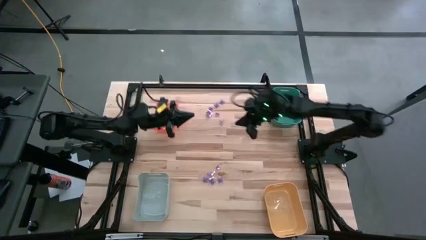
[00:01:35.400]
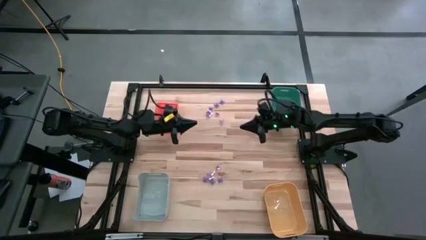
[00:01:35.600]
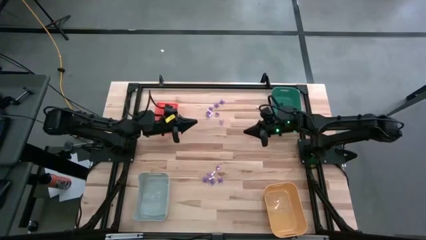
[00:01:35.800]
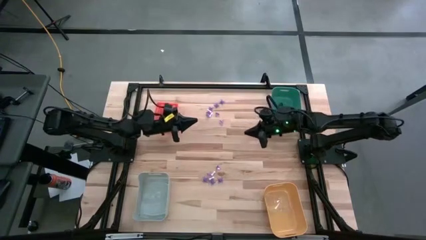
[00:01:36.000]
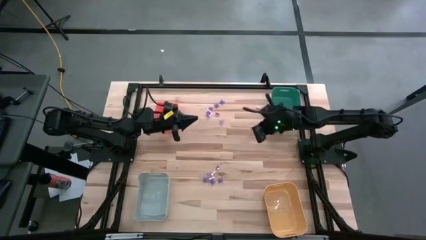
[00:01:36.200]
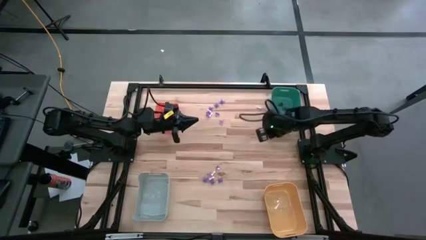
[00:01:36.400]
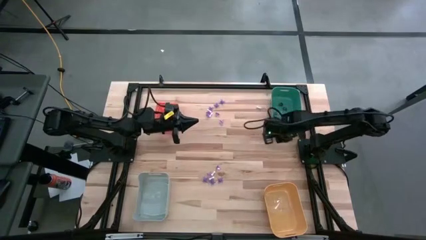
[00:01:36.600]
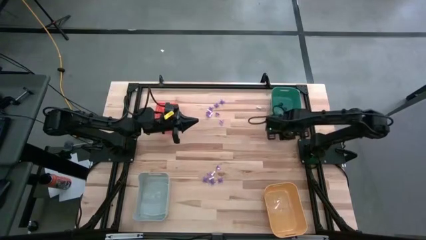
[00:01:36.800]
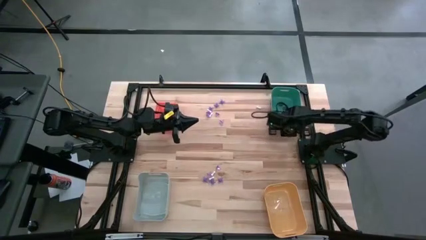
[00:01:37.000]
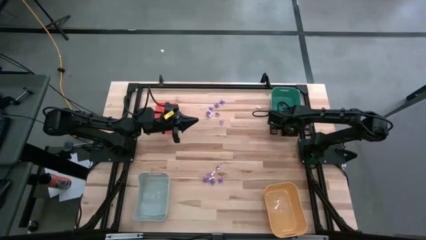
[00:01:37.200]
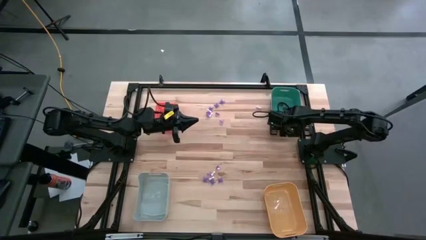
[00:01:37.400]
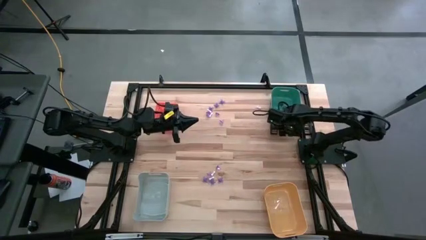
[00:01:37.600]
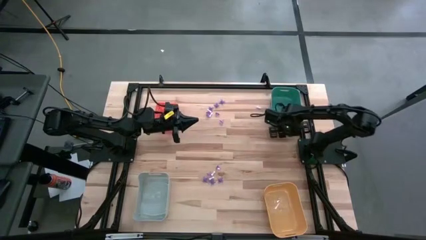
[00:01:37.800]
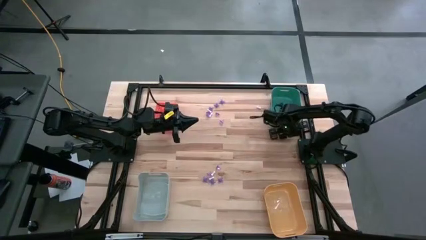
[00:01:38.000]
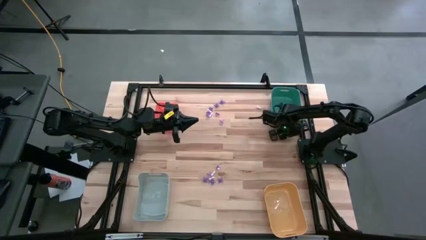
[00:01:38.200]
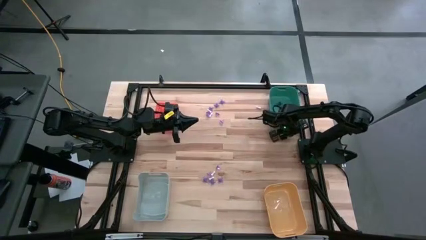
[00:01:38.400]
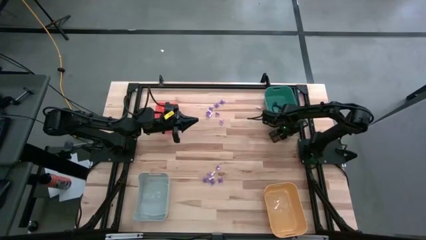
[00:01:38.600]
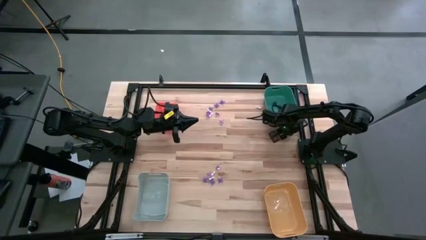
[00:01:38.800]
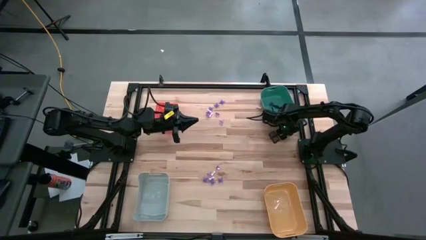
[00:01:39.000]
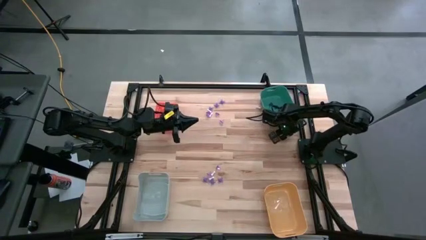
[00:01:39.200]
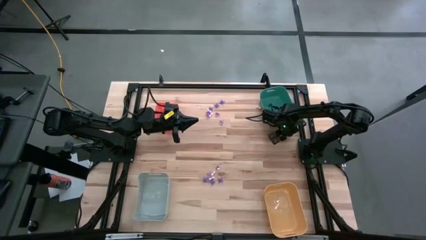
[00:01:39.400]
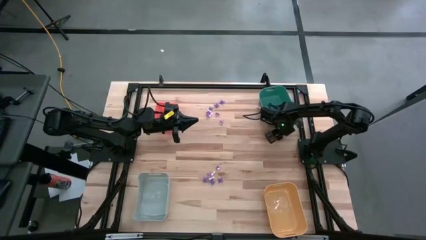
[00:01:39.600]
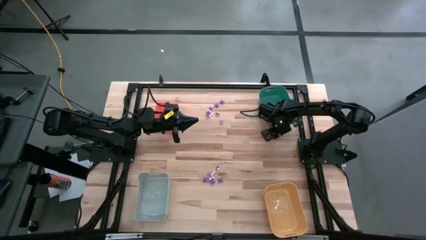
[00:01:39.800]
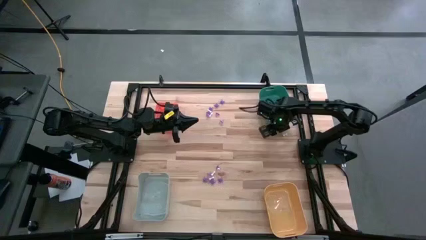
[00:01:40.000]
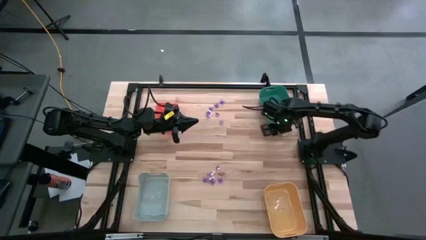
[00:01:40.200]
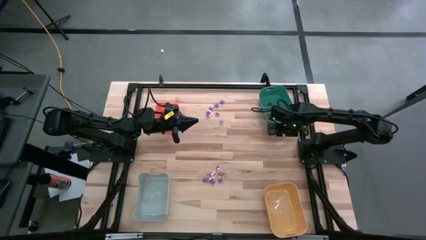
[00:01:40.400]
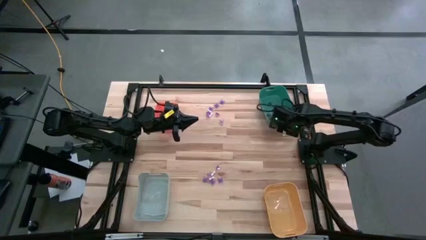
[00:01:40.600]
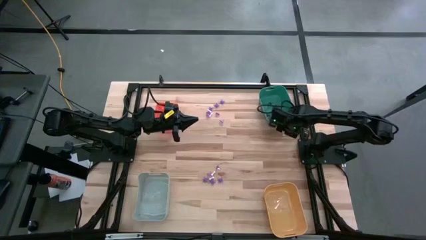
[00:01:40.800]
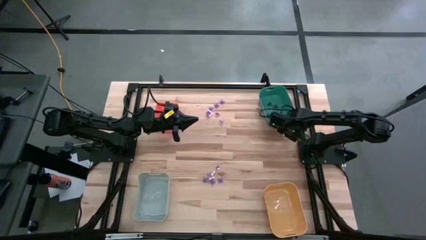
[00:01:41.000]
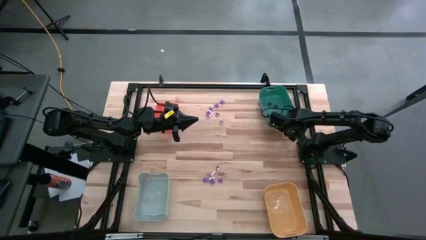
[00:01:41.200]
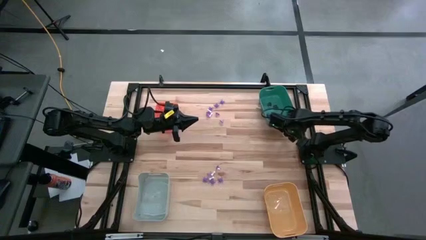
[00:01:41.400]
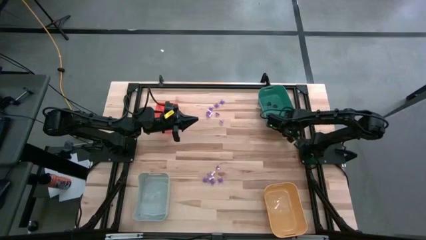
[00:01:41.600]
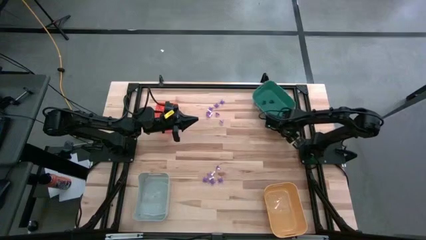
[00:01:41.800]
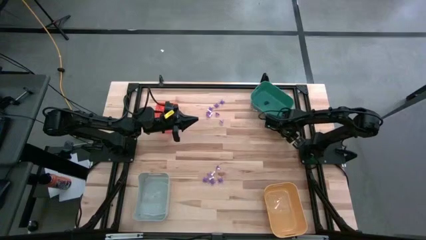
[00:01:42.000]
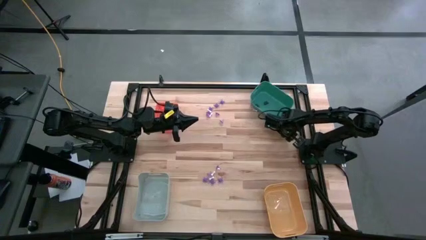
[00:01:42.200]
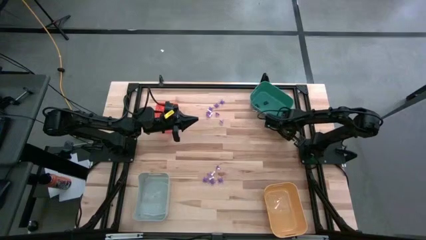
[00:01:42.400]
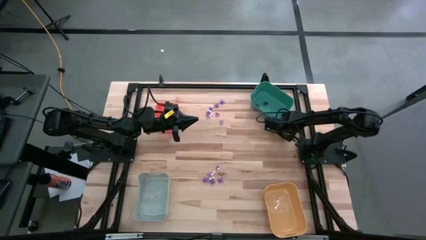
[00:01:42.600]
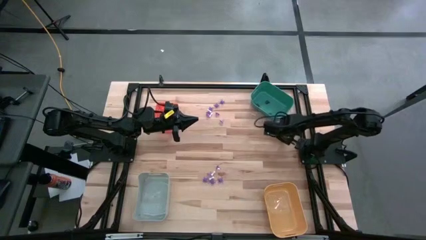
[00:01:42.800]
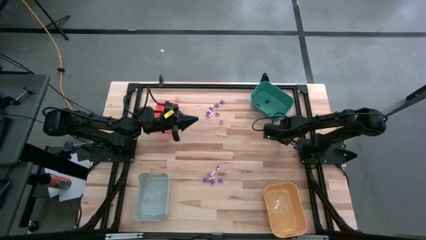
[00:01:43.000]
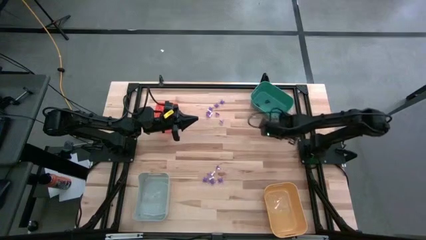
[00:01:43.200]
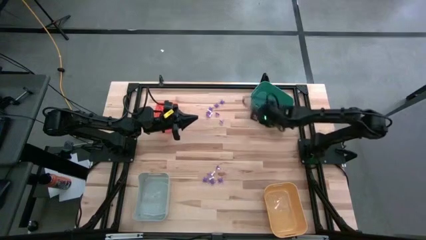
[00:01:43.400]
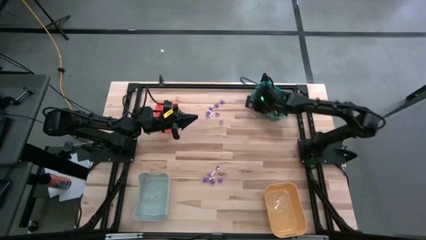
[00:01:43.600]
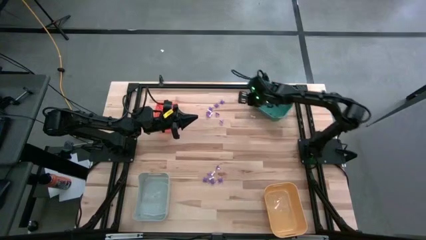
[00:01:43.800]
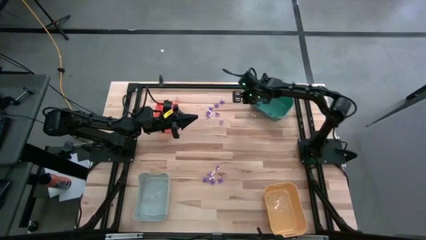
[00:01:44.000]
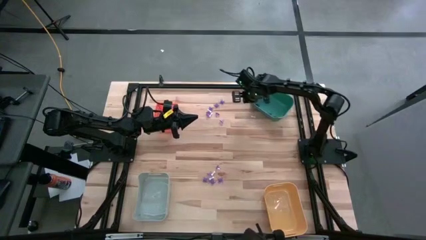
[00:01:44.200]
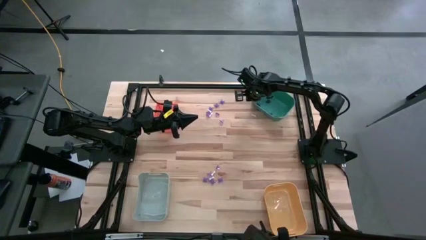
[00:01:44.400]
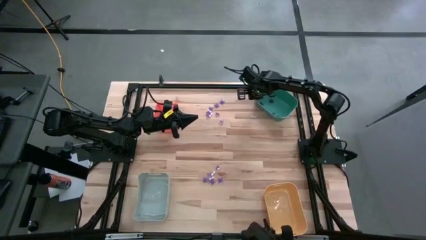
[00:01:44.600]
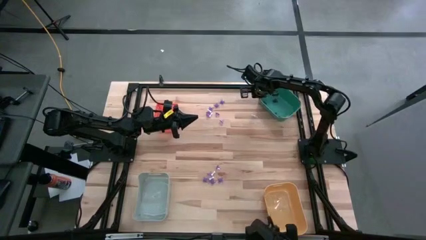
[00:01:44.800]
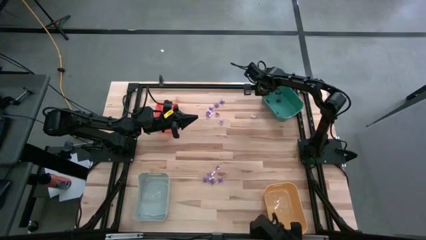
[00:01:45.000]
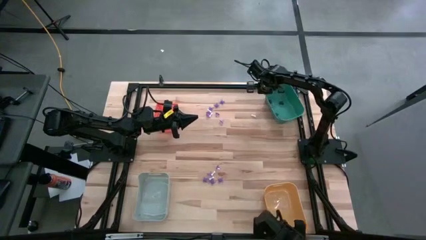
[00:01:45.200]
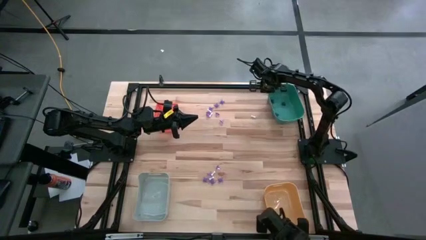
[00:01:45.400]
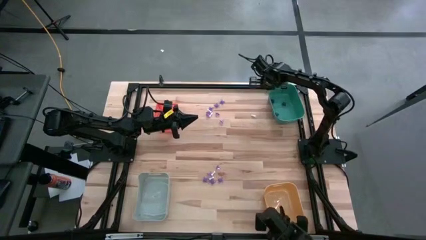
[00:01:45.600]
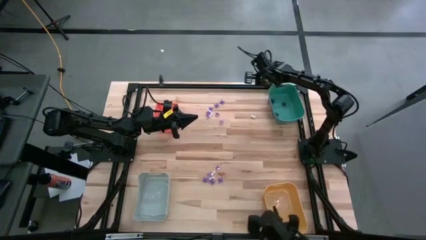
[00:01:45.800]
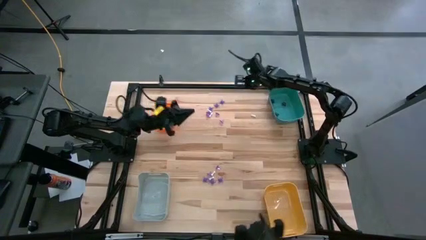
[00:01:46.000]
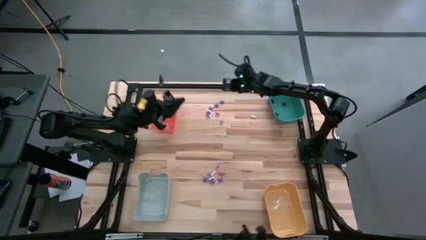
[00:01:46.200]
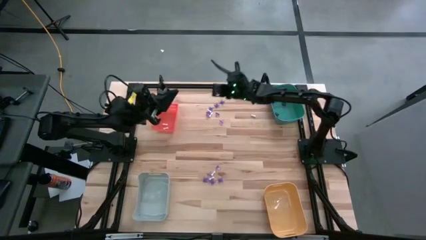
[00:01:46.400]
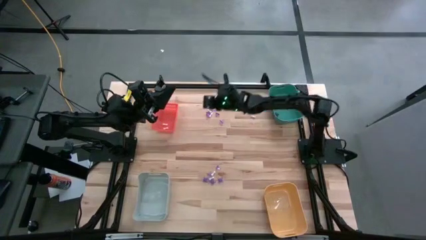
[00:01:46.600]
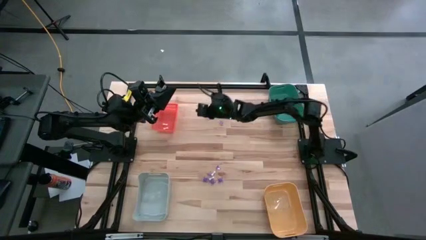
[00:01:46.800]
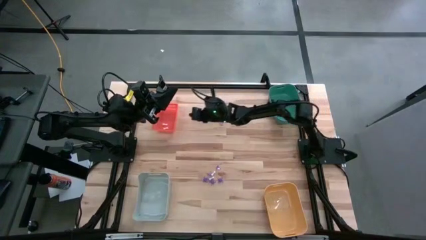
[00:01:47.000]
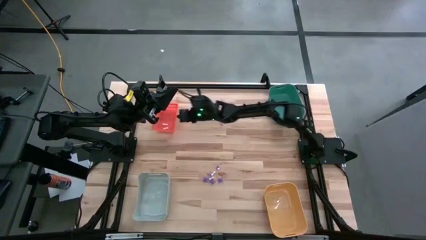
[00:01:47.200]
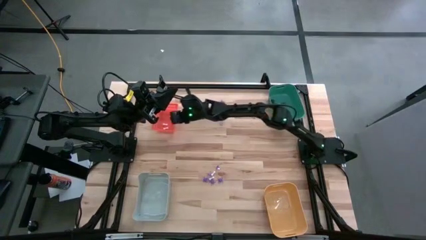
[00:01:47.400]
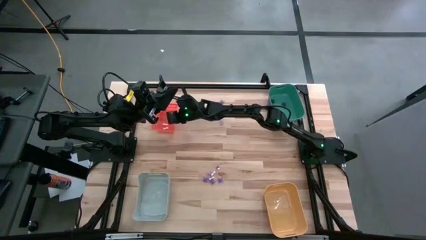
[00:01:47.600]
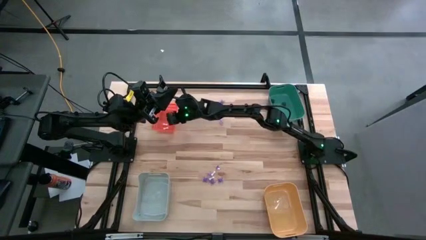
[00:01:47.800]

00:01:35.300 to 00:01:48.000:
Task: Sort Halloween decoration
Put the white bone toy into the orange bin

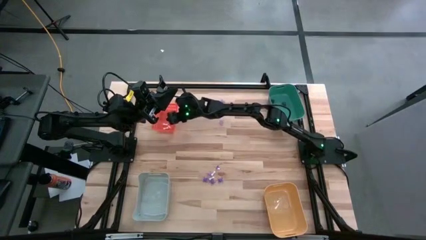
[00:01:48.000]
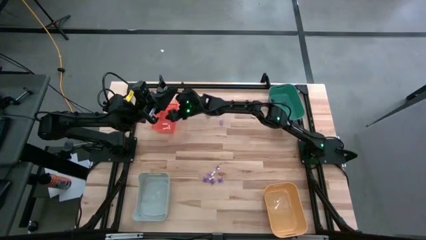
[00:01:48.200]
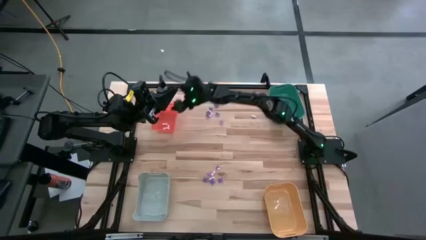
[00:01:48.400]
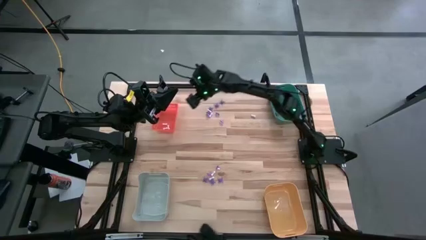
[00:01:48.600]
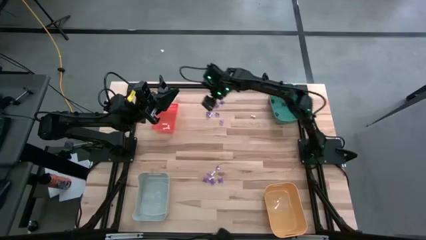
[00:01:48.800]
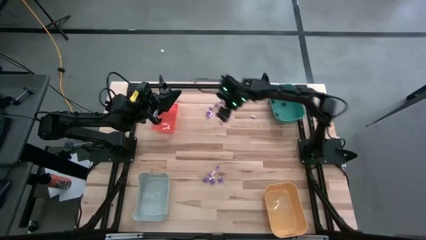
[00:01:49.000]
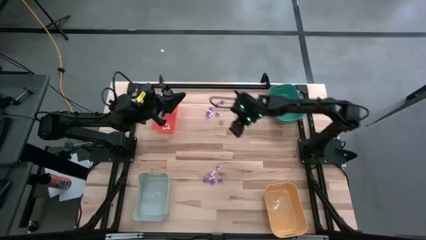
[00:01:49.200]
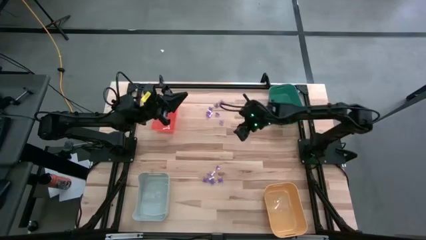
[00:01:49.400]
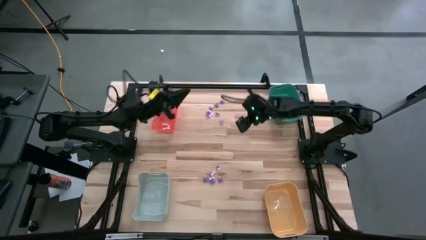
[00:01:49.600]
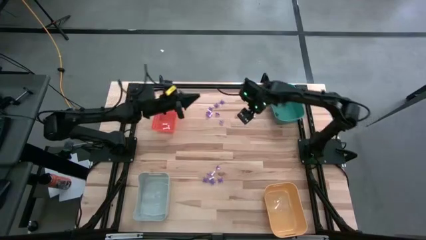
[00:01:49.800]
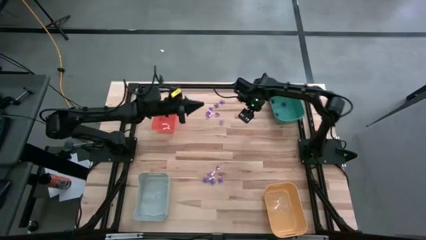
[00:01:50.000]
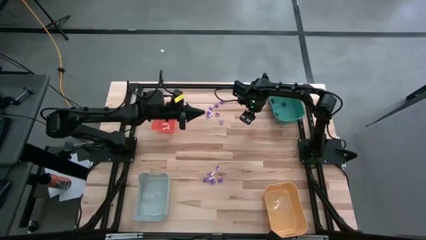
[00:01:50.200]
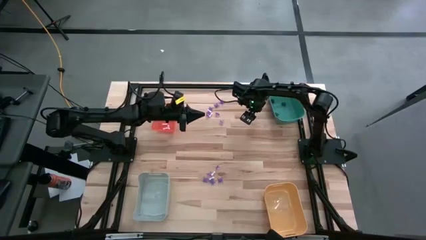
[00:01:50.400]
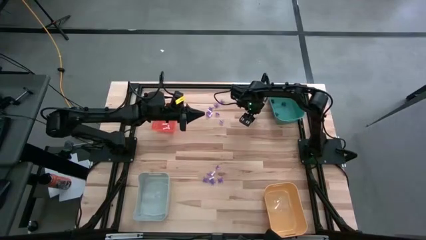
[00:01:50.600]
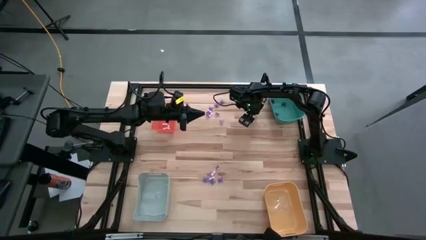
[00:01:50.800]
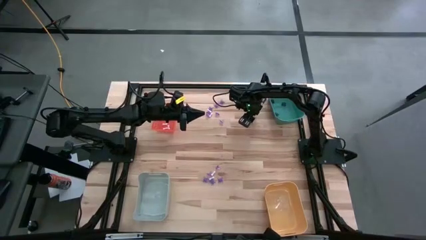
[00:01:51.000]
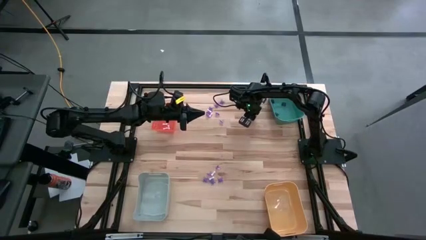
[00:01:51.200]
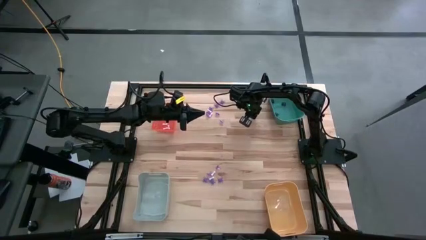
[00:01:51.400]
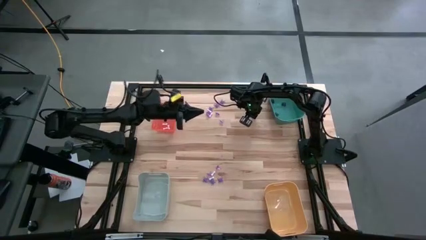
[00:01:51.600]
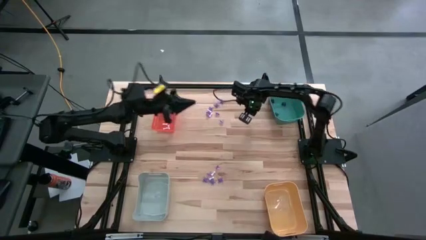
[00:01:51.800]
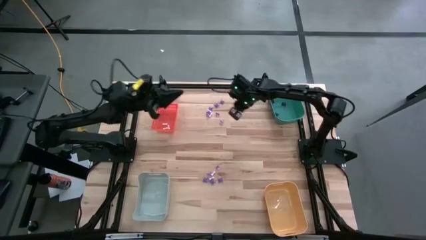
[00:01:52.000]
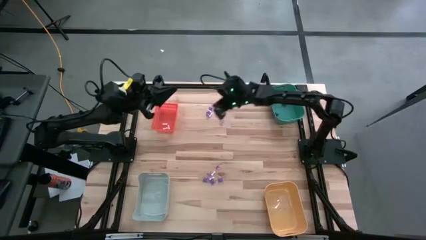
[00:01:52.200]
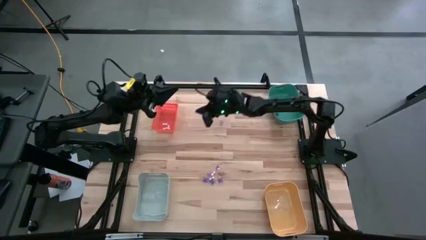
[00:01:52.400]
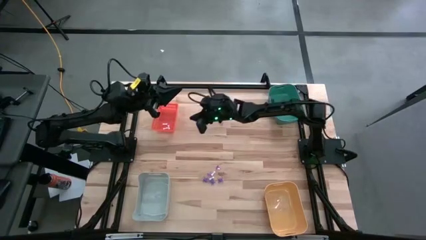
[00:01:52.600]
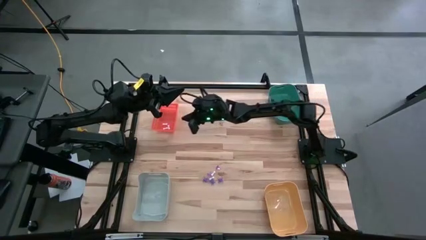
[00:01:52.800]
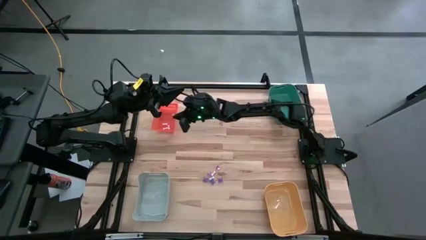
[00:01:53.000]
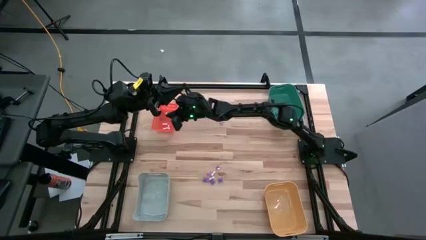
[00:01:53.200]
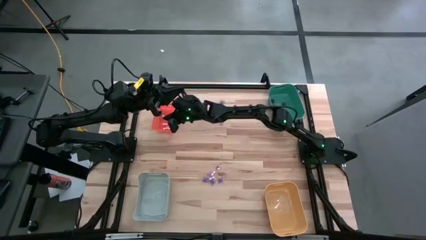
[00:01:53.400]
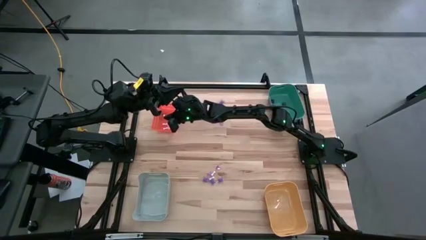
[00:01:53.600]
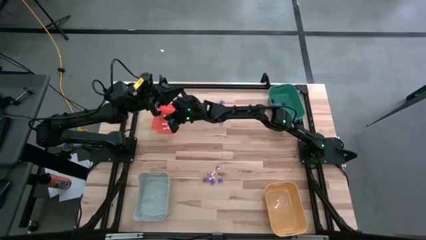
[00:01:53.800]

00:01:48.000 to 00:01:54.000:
Put the white bone toy into the orange bin
